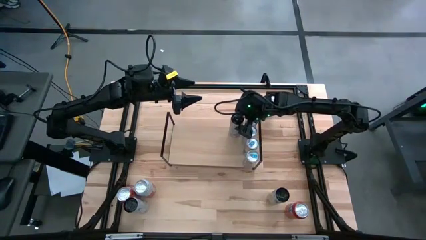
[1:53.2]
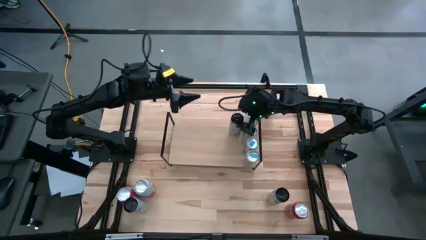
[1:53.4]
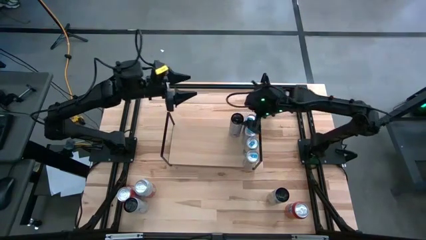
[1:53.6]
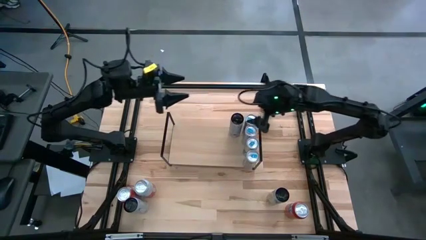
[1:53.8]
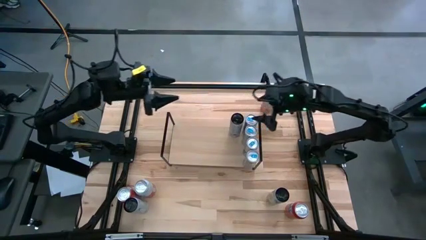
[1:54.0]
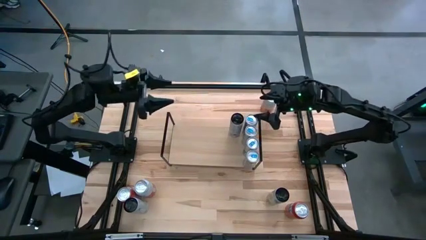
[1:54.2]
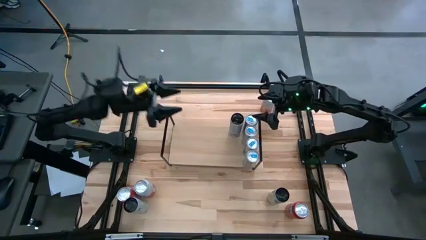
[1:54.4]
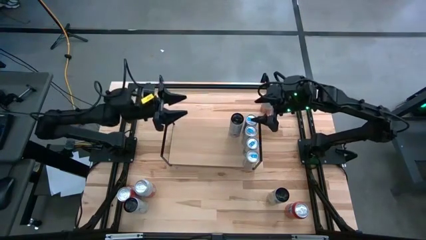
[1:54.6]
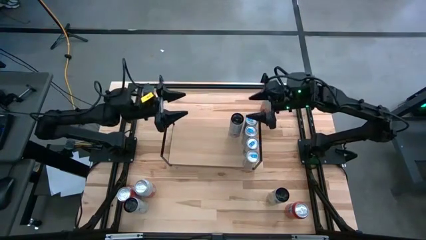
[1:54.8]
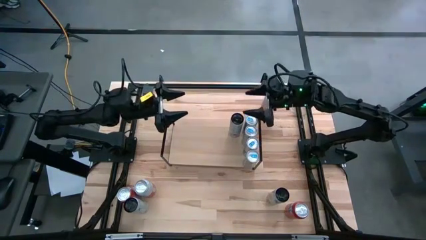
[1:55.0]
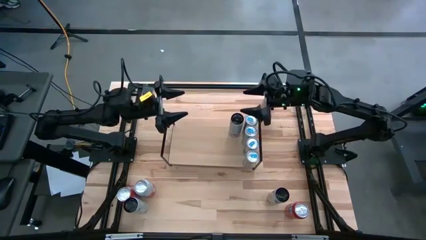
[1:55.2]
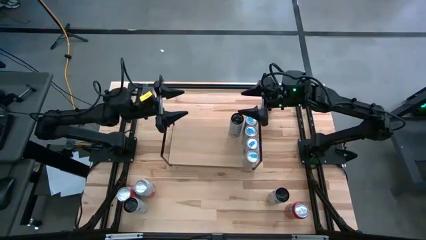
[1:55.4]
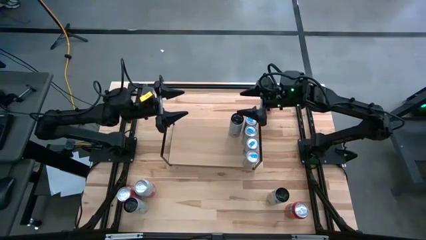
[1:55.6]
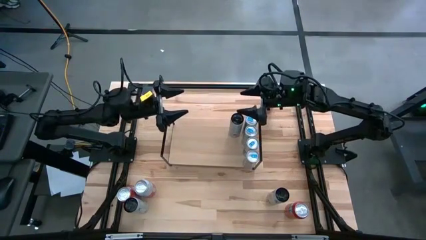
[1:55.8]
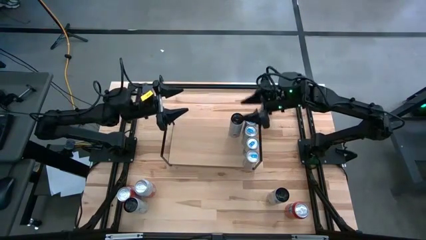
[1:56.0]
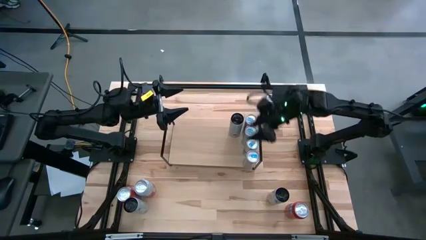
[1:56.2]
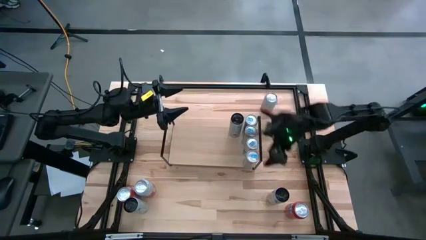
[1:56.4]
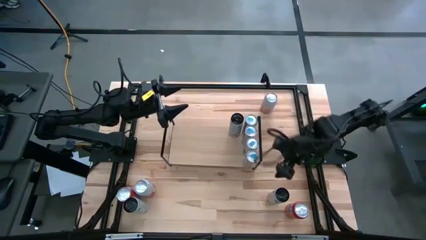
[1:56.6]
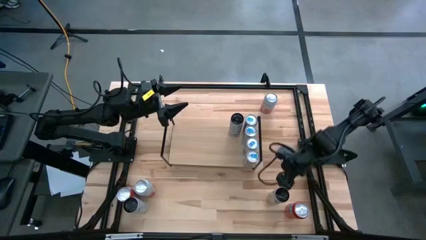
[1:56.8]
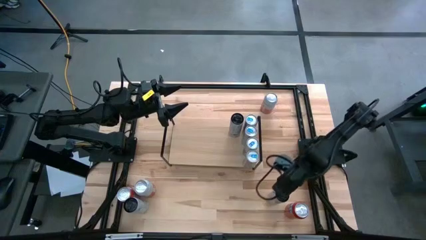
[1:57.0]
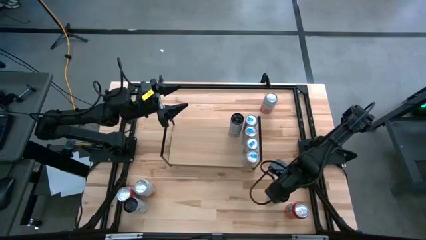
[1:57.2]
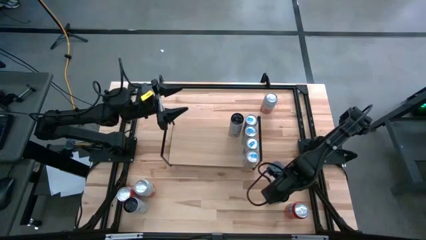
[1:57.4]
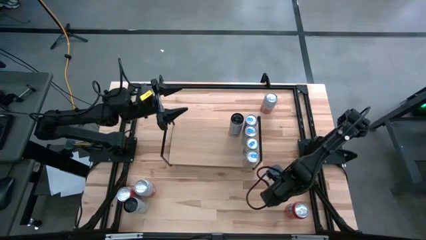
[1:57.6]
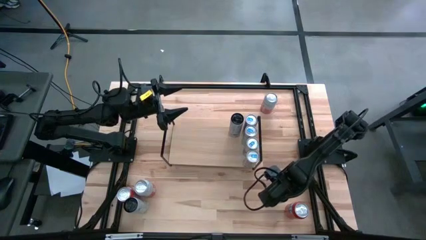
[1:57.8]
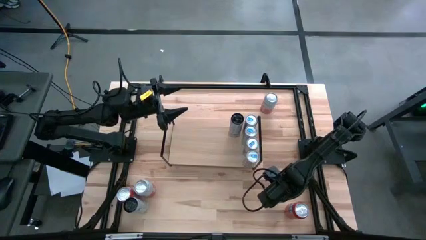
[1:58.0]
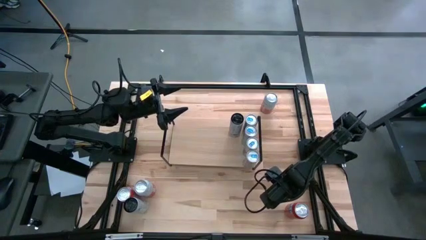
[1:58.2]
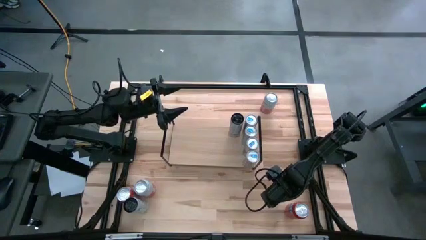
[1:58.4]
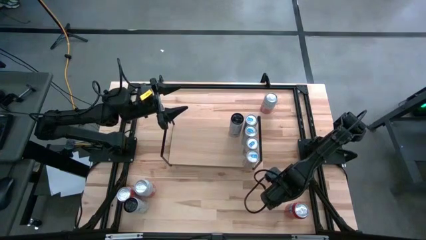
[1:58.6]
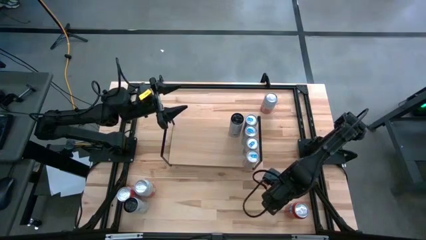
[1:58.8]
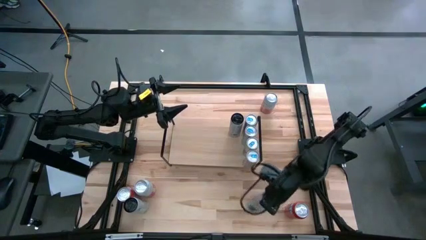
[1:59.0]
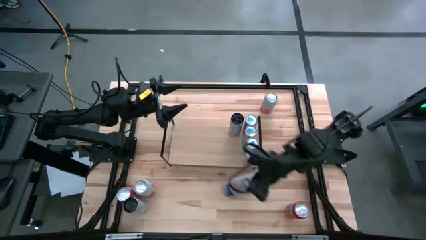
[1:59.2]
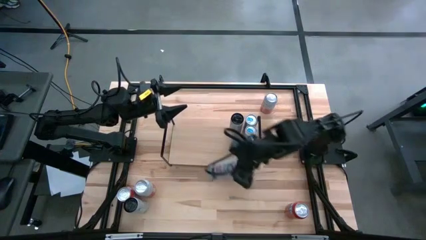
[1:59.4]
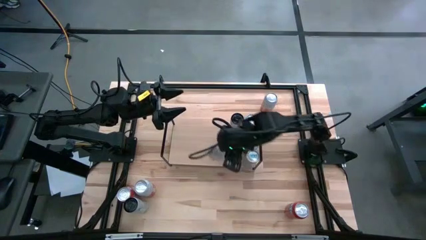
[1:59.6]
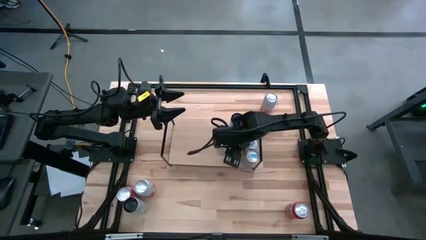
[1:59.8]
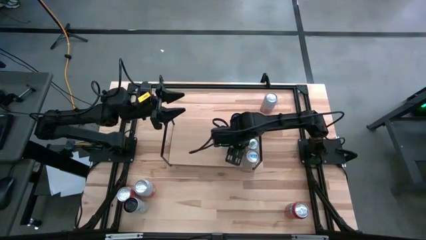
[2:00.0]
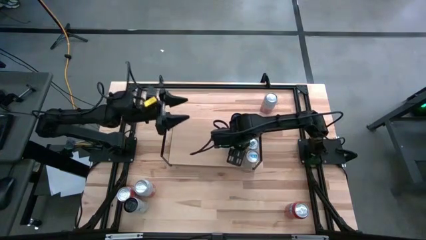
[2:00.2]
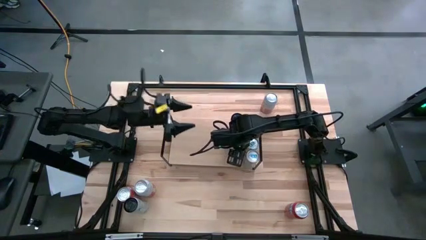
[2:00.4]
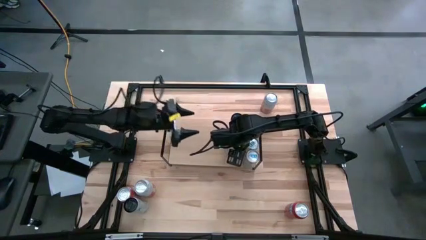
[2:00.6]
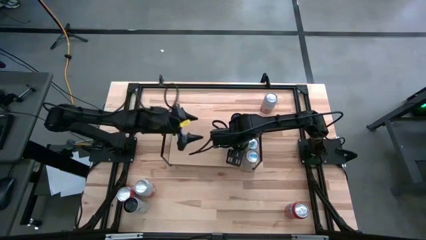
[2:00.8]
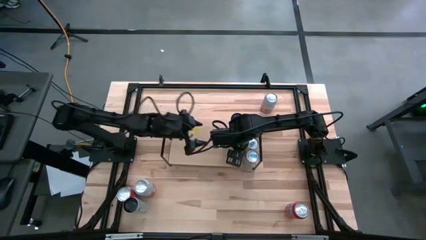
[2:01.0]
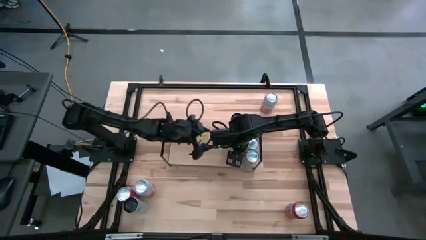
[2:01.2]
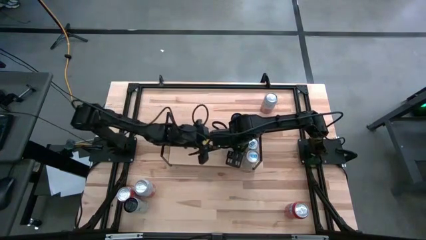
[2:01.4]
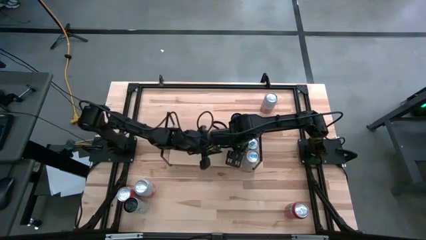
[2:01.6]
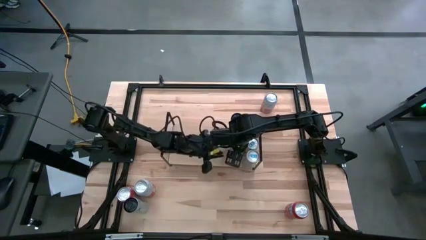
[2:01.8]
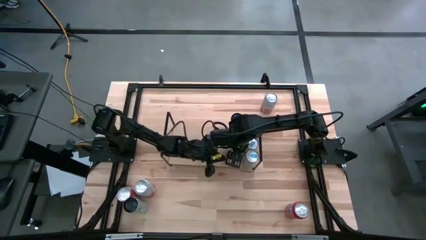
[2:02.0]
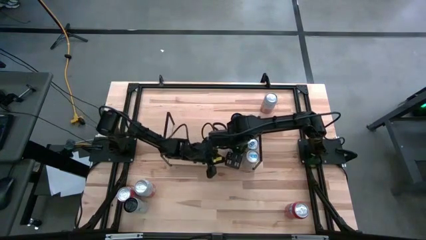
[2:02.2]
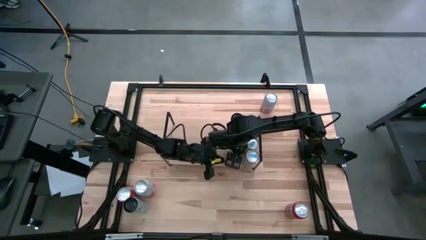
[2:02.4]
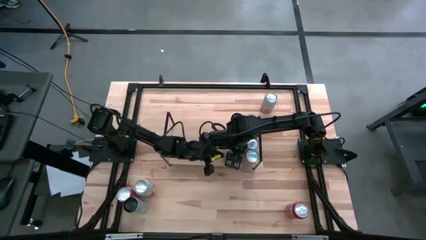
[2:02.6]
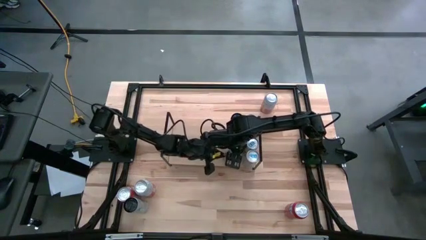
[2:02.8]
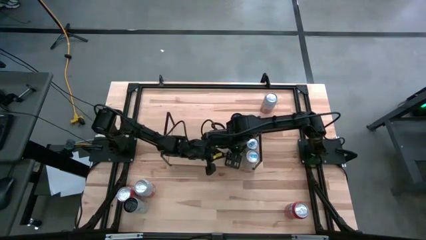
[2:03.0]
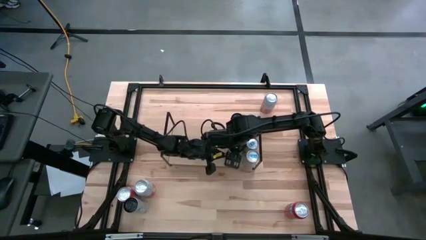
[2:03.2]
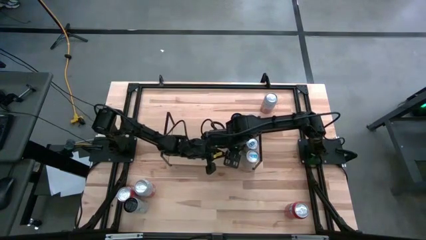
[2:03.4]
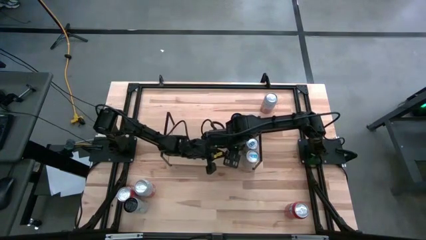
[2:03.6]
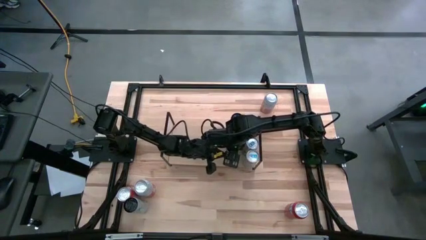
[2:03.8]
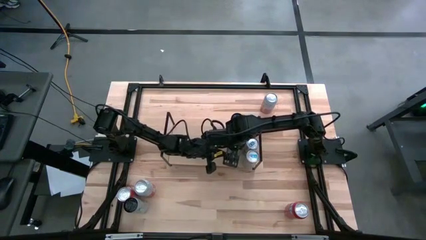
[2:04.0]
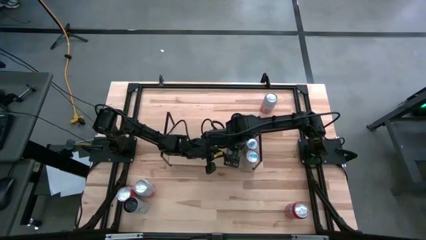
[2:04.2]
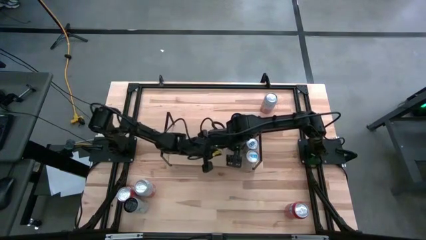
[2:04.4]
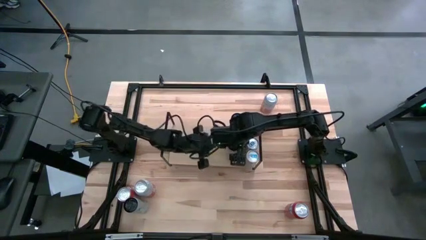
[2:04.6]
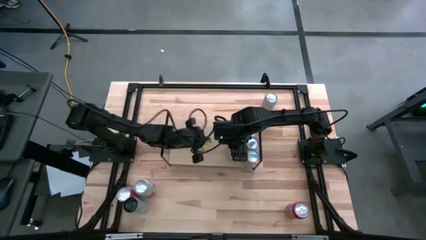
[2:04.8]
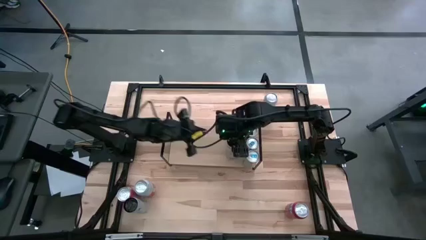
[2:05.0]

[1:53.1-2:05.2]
Task: Place canned beverage on shelf
Put the black soda can aligned with the other black soda can on the shelf
